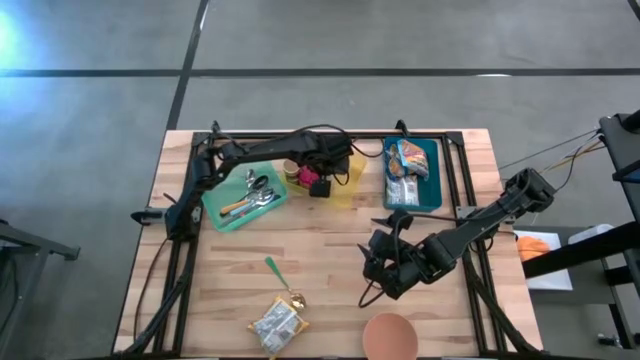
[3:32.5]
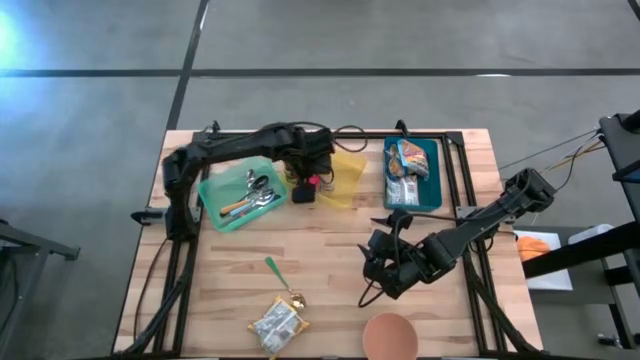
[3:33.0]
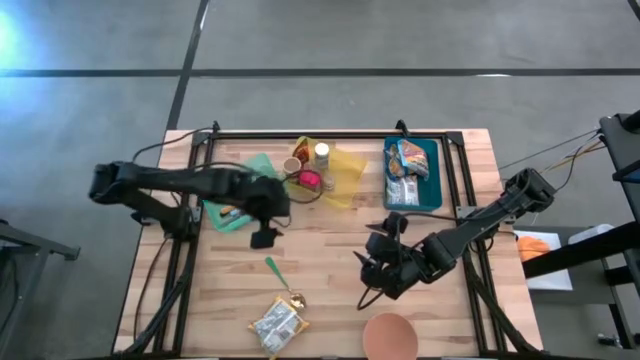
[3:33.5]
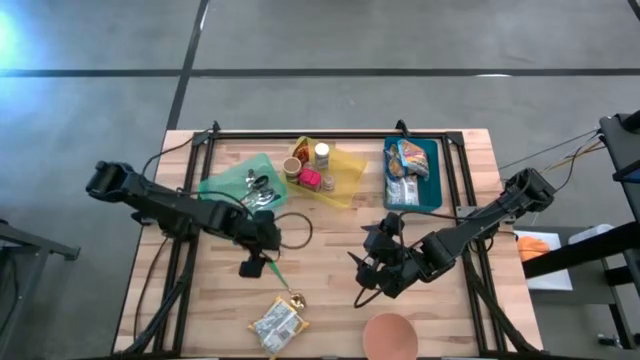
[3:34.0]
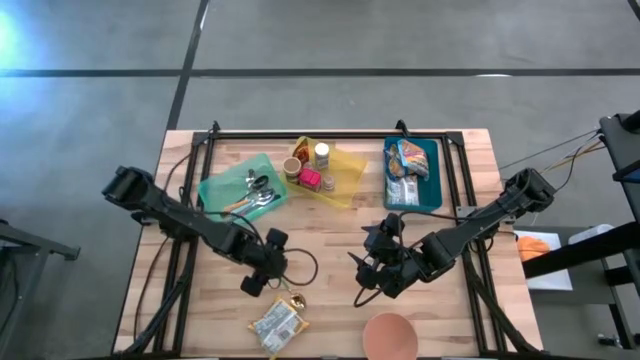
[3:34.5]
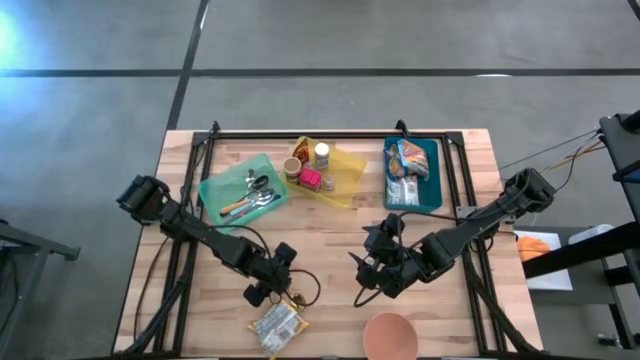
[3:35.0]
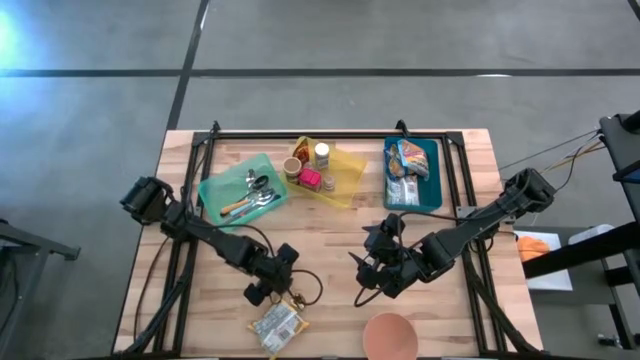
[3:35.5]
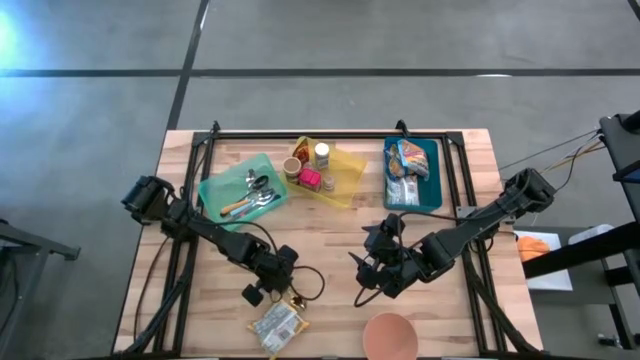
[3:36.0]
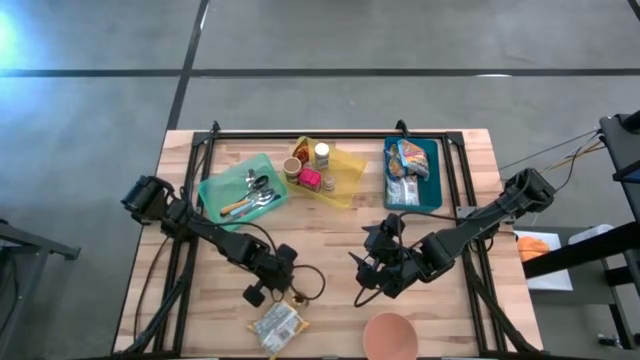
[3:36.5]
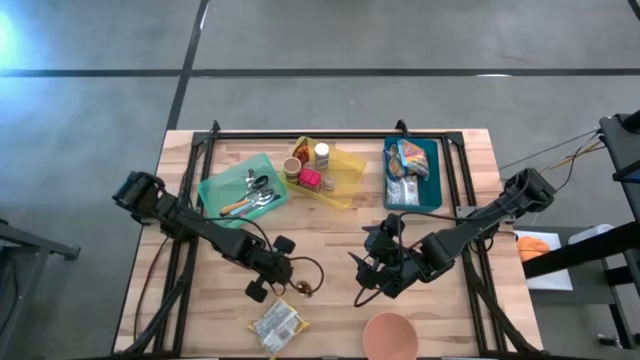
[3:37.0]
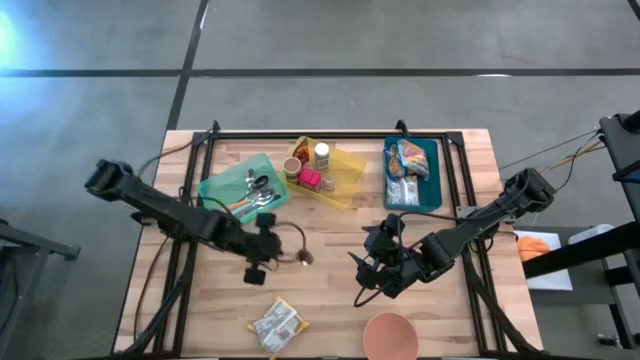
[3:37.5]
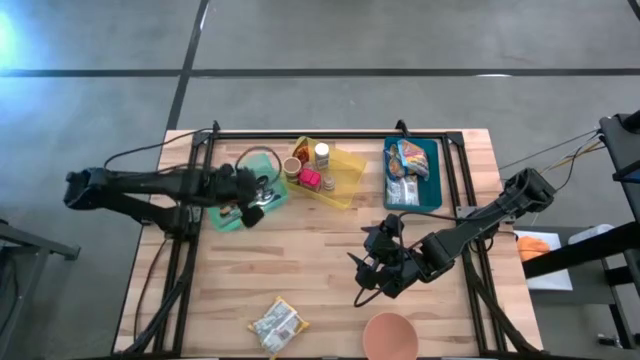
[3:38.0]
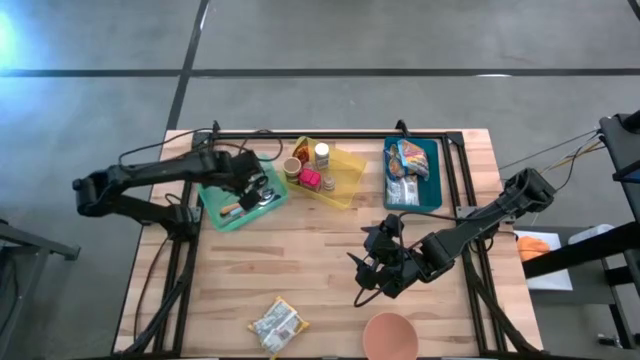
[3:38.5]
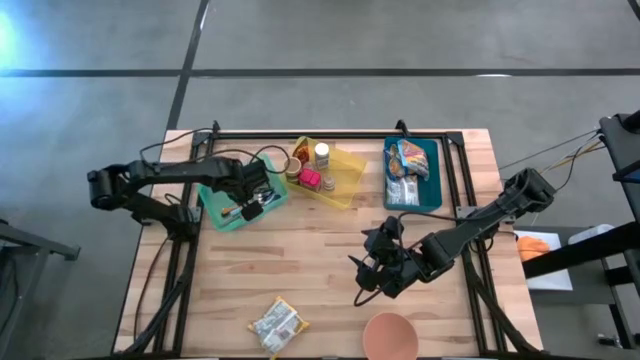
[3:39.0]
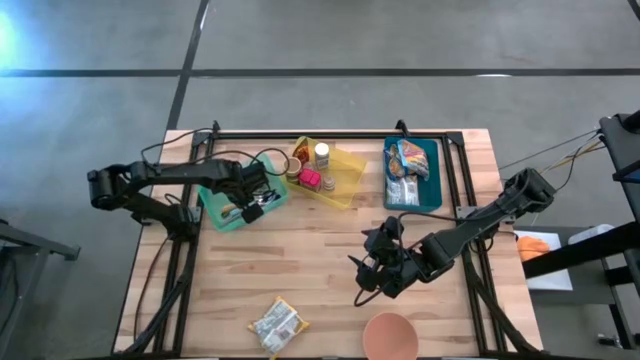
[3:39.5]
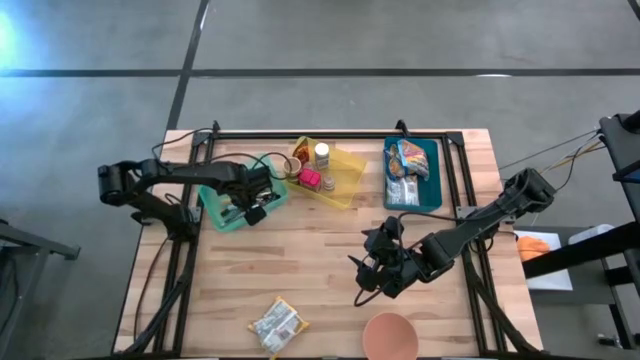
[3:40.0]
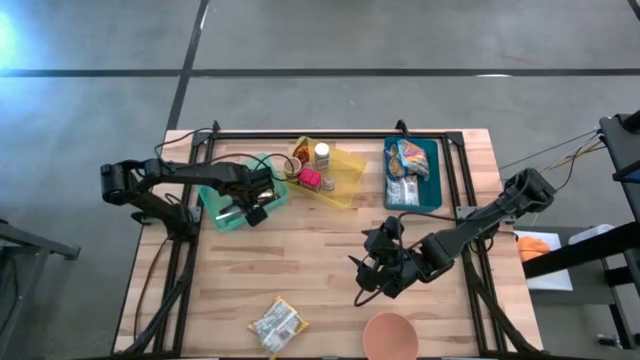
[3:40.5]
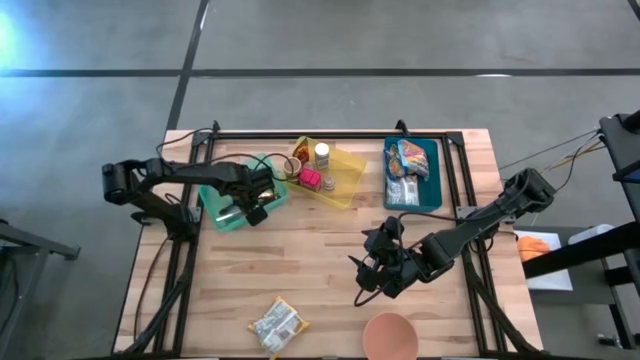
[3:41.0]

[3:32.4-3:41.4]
Put the gold spoon into the green bin

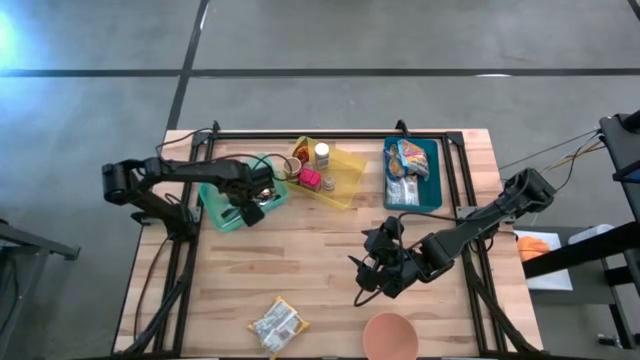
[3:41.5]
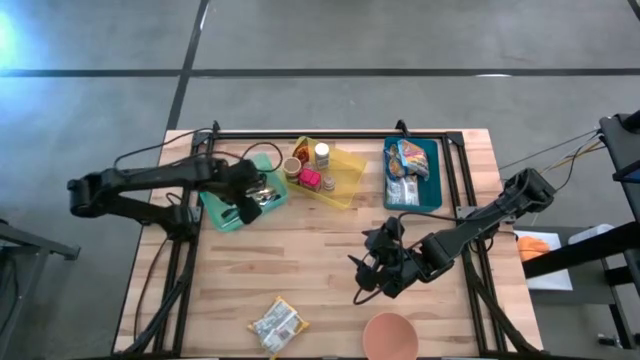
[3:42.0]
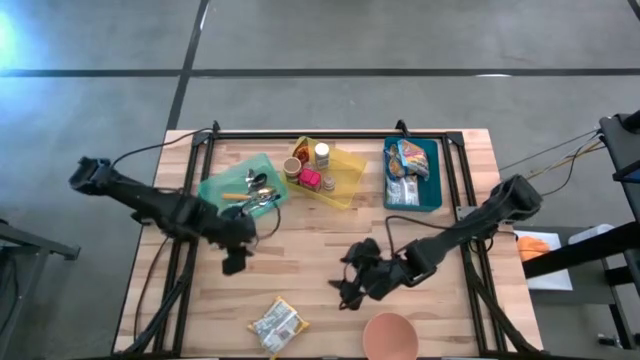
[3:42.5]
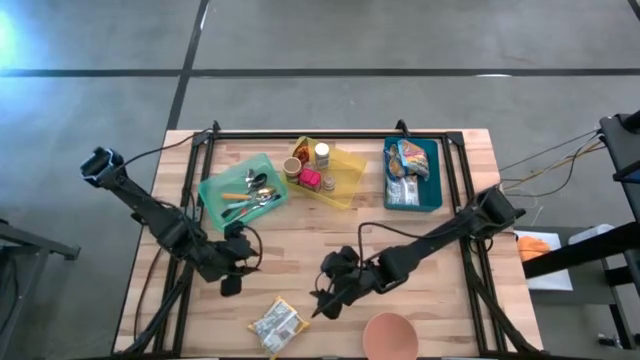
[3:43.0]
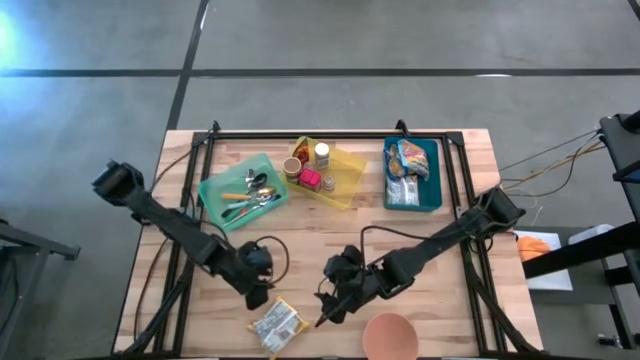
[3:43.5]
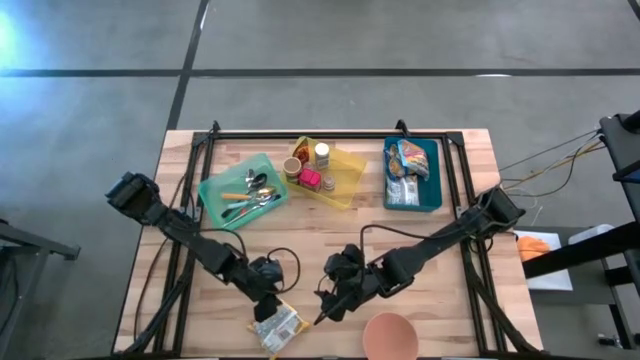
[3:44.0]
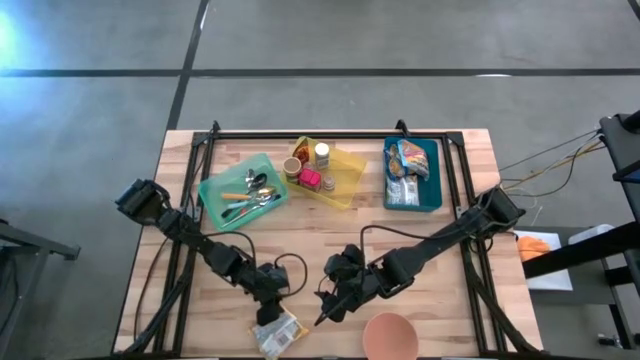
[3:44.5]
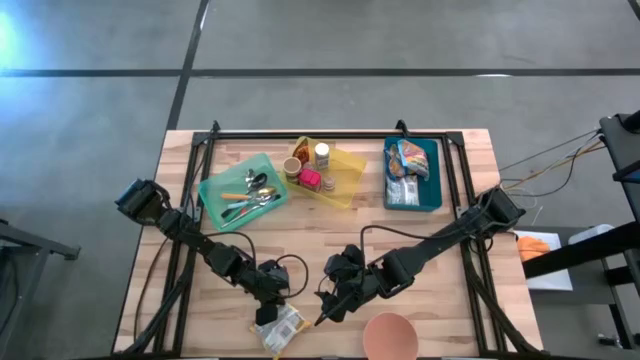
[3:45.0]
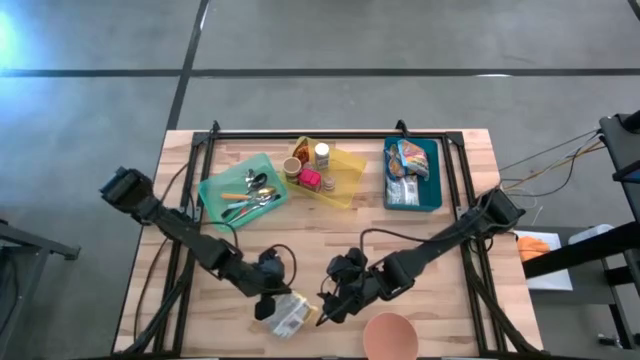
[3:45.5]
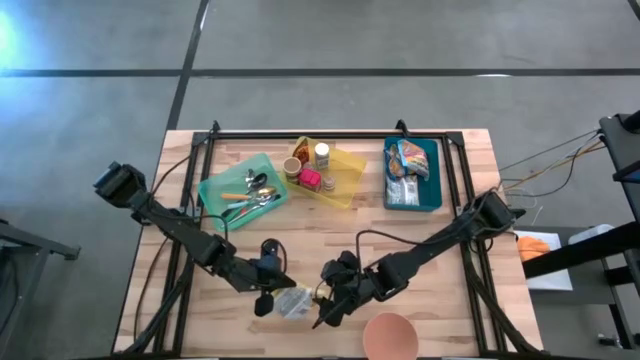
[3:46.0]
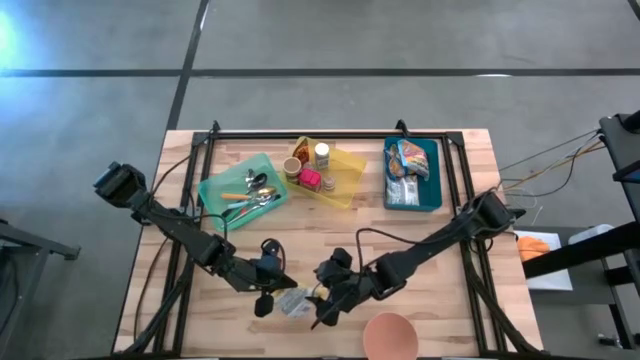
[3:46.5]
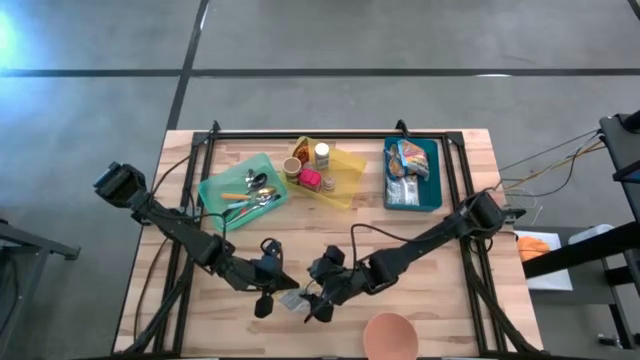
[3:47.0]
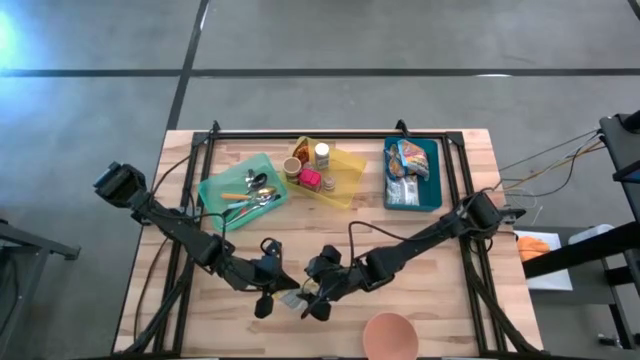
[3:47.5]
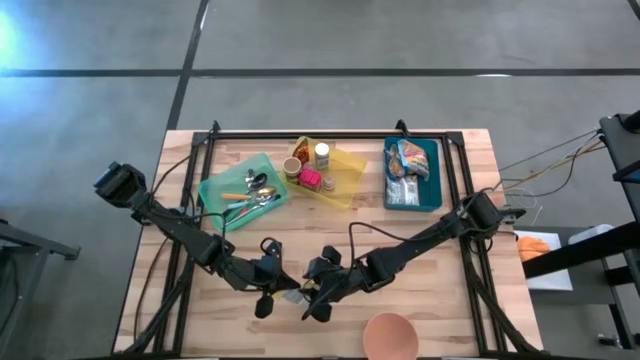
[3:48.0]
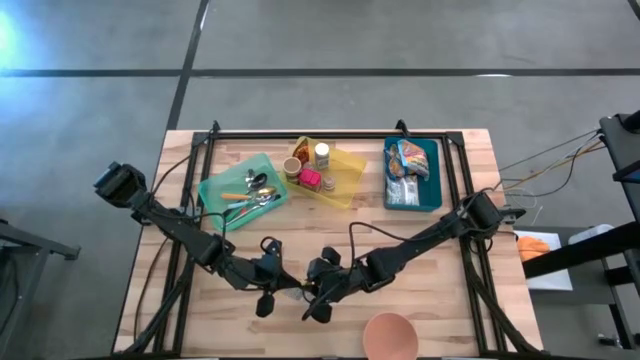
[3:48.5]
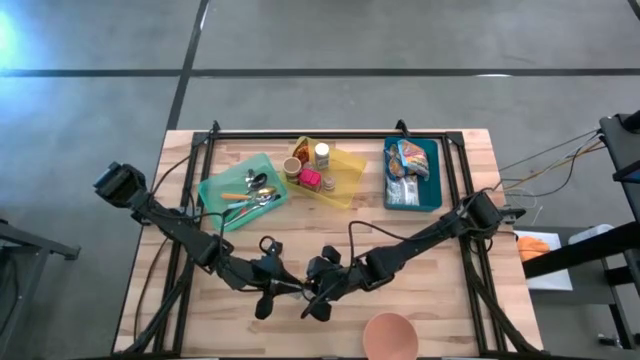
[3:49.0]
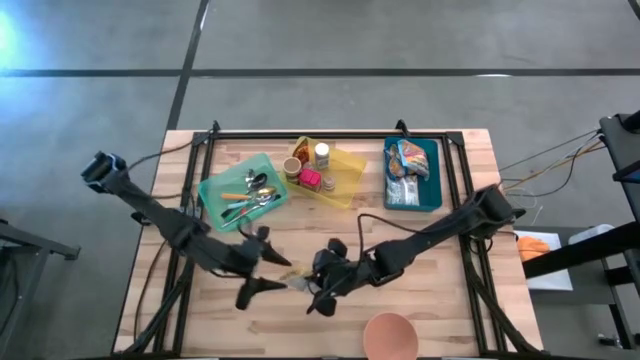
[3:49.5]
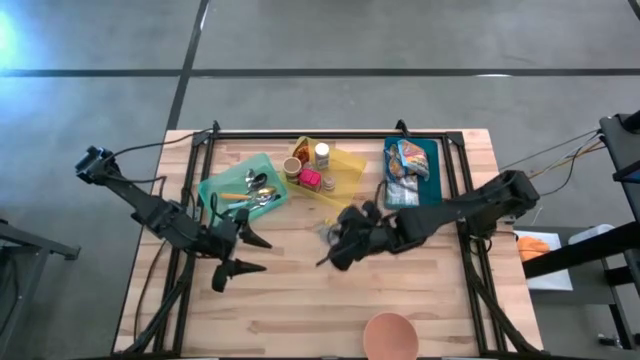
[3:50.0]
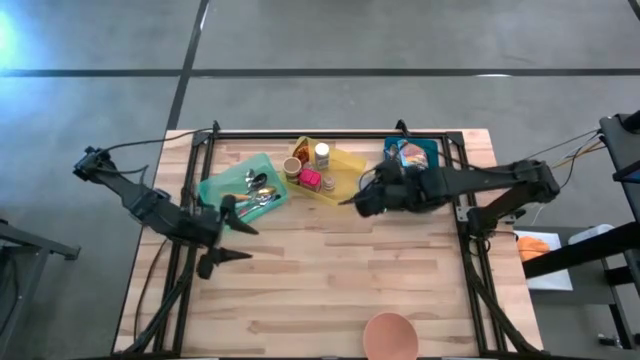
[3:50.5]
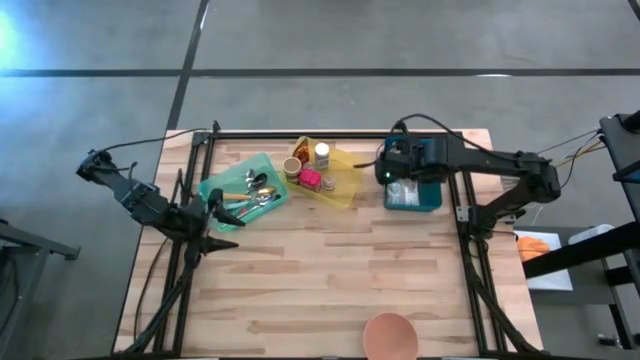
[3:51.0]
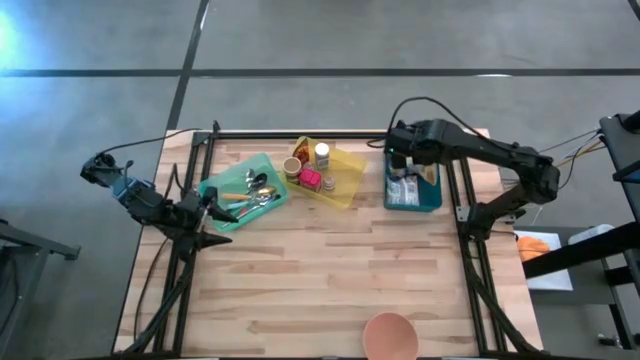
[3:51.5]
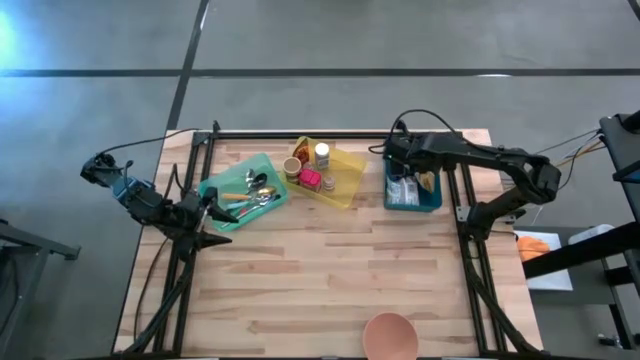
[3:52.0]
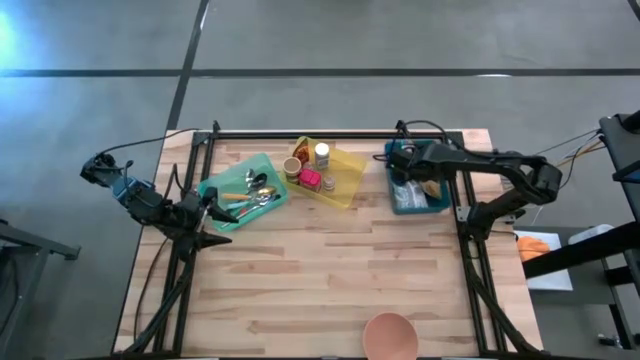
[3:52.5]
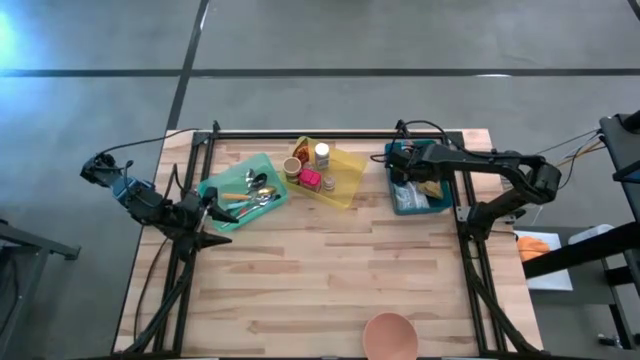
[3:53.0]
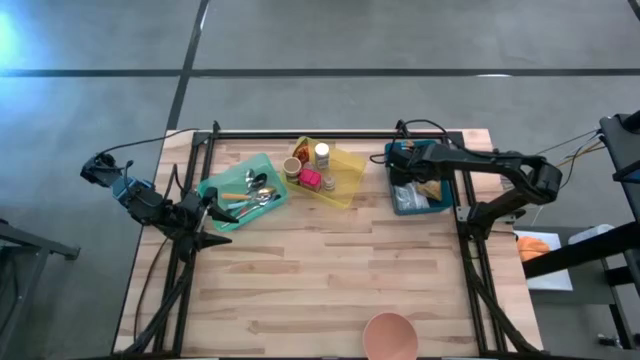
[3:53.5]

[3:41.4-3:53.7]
Put the yellow noodle pack into the blue bin
